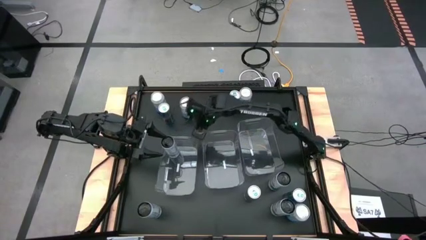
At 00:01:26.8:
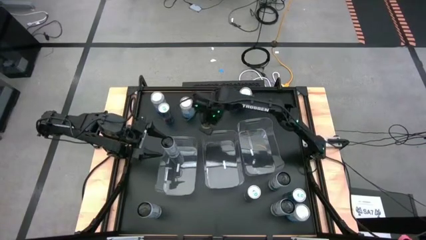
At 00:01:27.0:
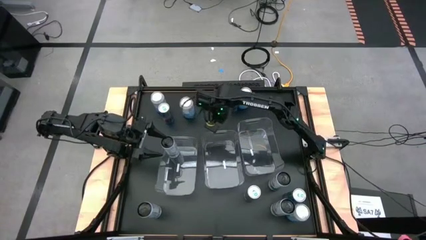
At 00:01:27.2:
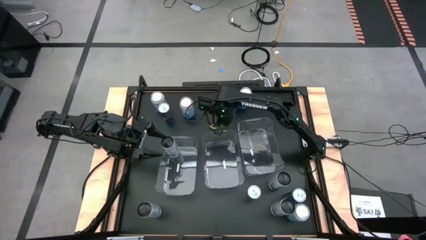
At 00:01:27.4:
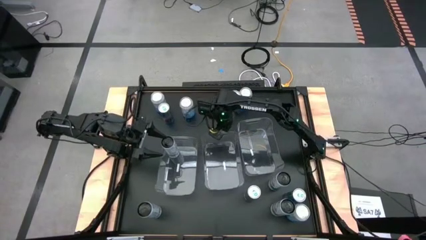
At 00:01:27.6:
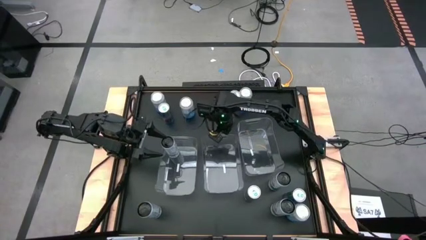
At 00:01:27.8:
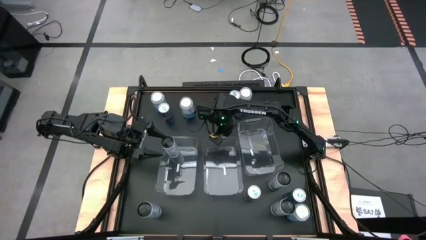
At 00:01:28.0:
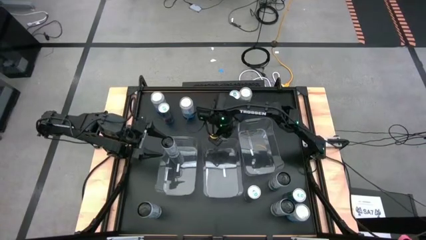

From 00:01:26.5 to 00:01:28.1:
Task: Sort soda cans
Adjust the middle transparent bin

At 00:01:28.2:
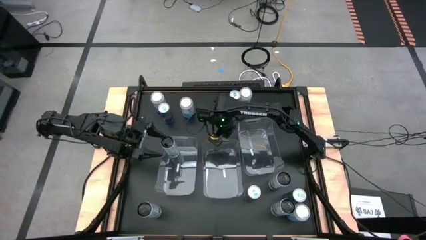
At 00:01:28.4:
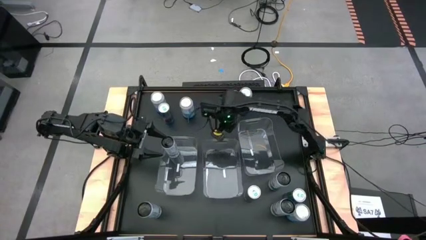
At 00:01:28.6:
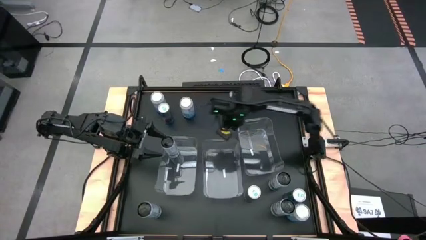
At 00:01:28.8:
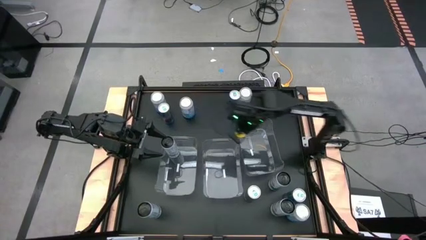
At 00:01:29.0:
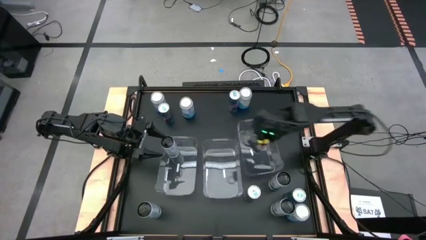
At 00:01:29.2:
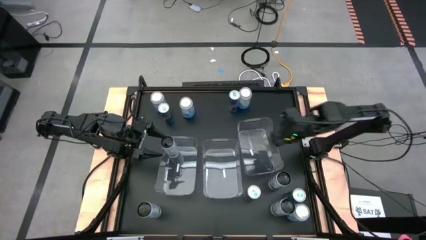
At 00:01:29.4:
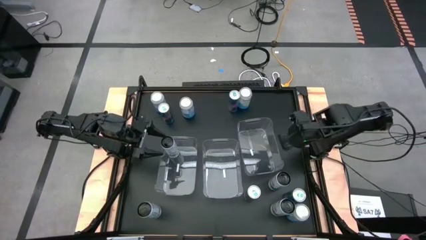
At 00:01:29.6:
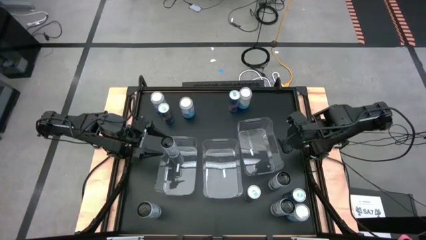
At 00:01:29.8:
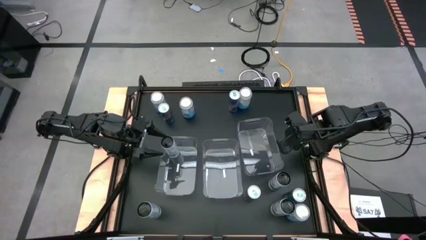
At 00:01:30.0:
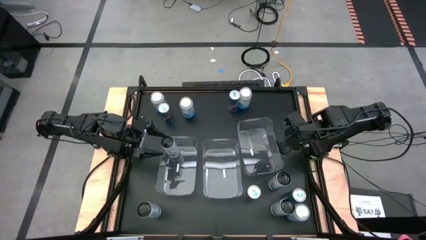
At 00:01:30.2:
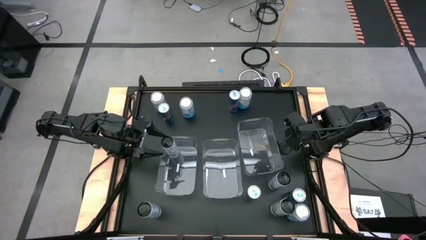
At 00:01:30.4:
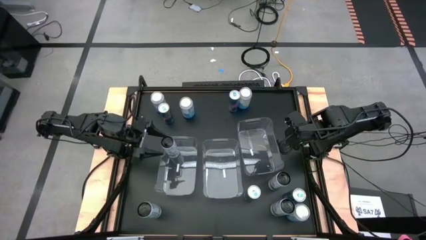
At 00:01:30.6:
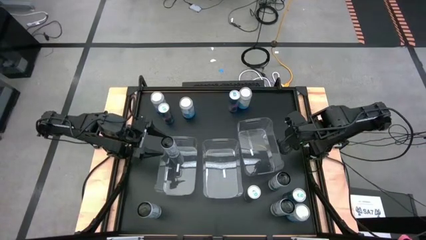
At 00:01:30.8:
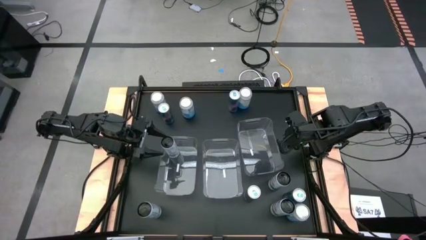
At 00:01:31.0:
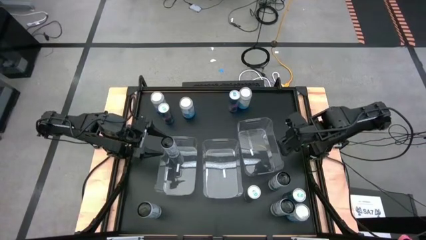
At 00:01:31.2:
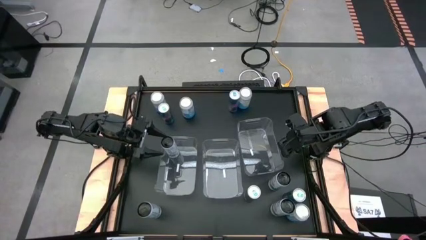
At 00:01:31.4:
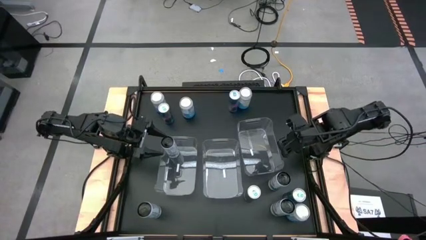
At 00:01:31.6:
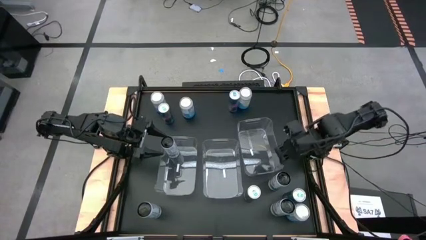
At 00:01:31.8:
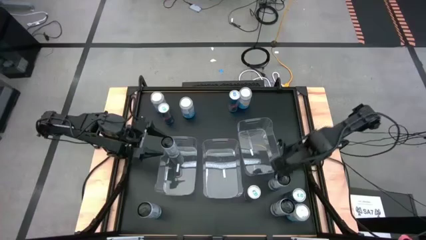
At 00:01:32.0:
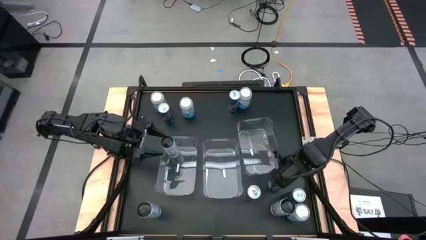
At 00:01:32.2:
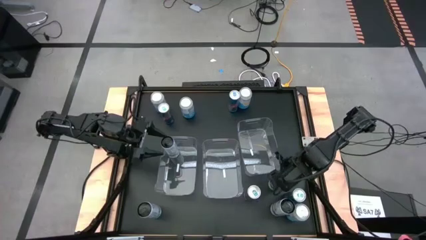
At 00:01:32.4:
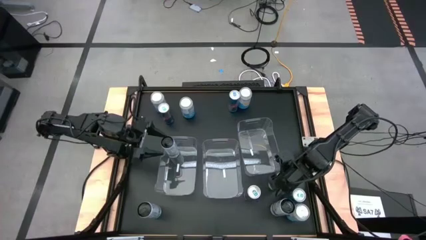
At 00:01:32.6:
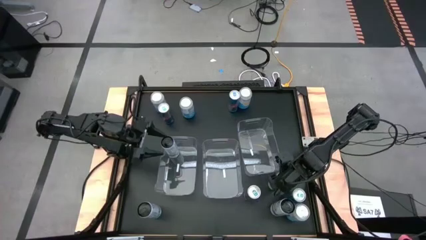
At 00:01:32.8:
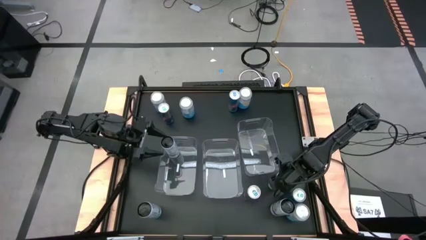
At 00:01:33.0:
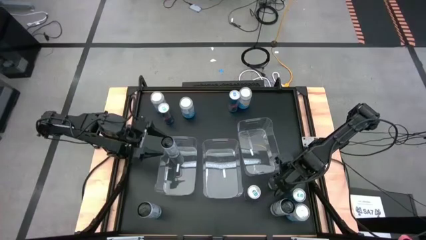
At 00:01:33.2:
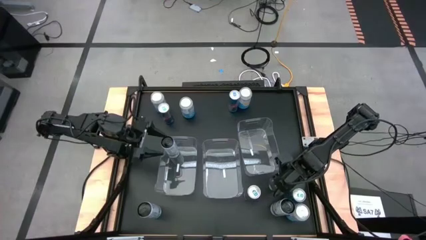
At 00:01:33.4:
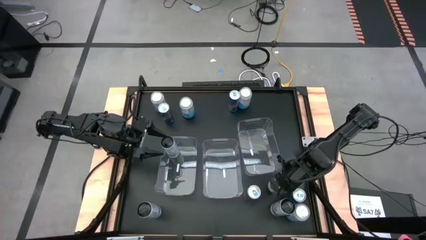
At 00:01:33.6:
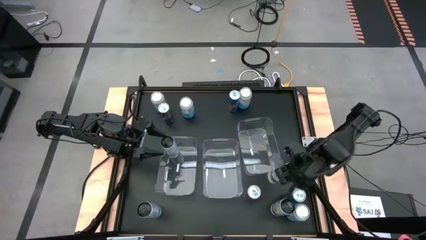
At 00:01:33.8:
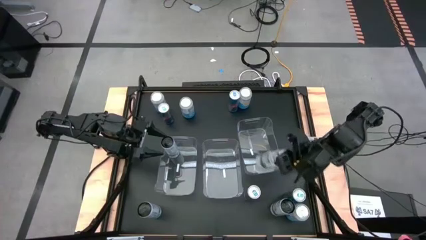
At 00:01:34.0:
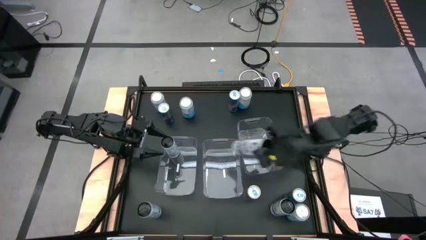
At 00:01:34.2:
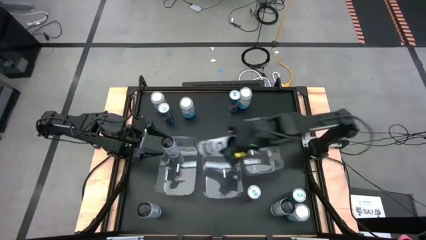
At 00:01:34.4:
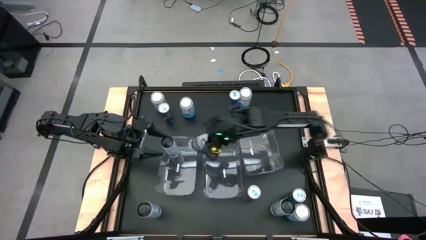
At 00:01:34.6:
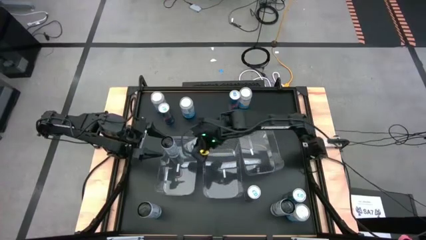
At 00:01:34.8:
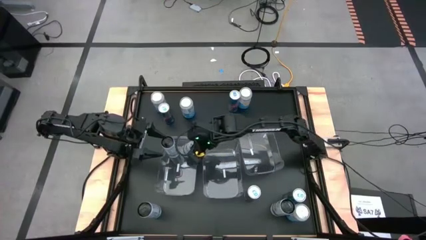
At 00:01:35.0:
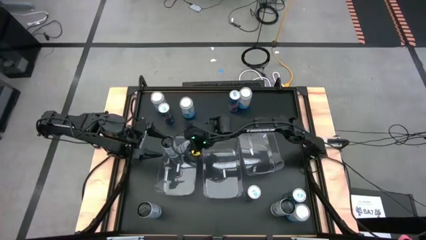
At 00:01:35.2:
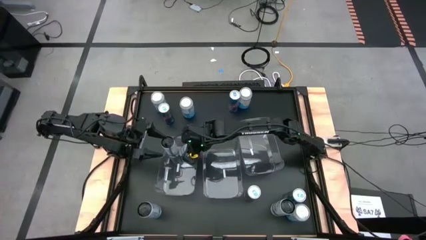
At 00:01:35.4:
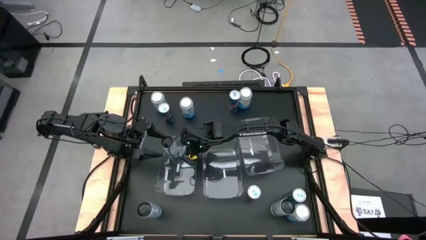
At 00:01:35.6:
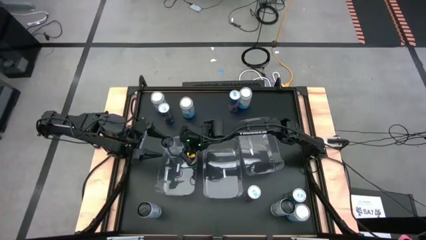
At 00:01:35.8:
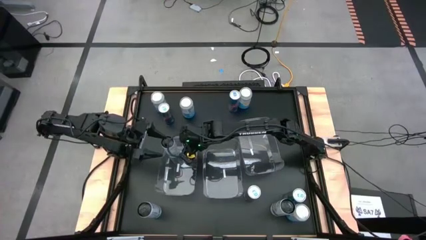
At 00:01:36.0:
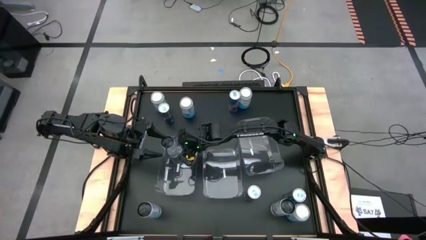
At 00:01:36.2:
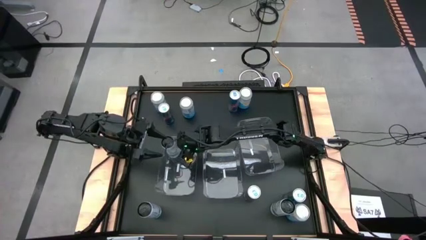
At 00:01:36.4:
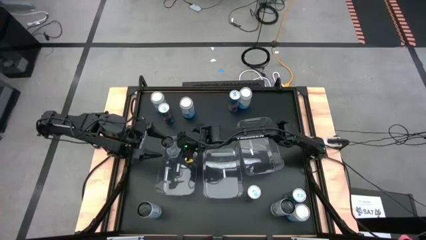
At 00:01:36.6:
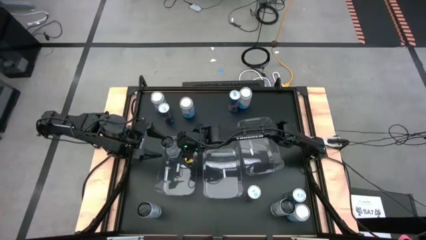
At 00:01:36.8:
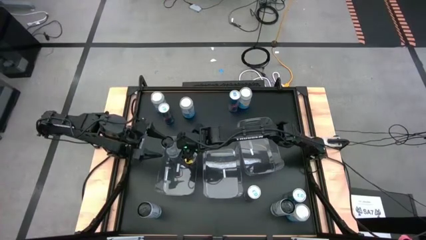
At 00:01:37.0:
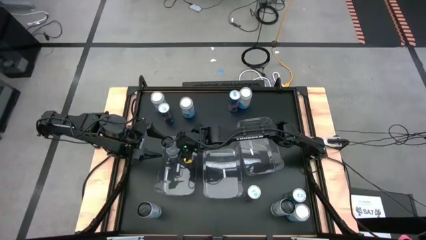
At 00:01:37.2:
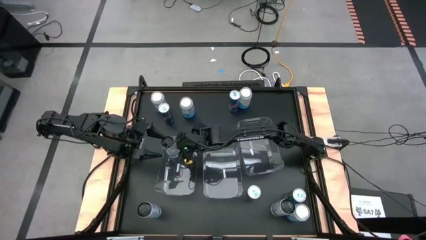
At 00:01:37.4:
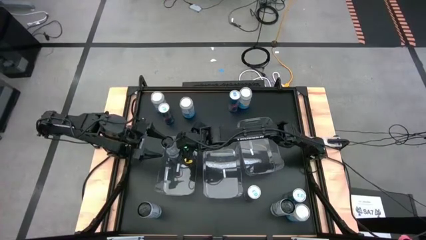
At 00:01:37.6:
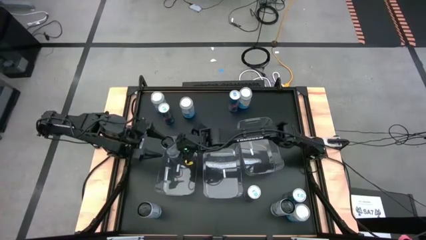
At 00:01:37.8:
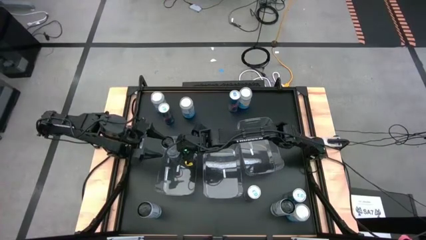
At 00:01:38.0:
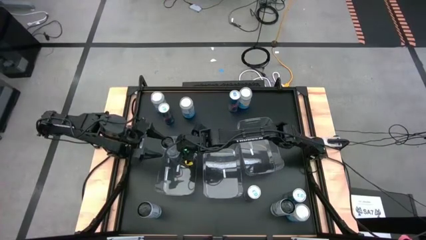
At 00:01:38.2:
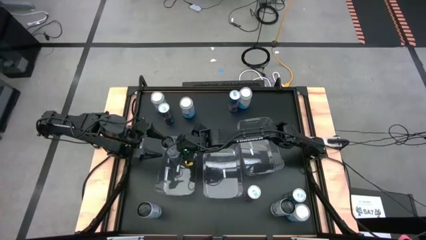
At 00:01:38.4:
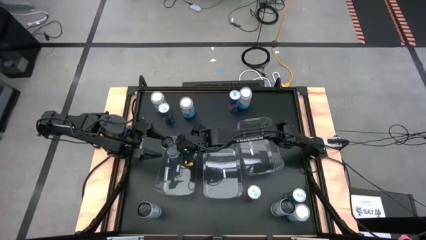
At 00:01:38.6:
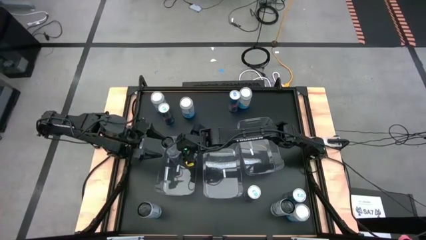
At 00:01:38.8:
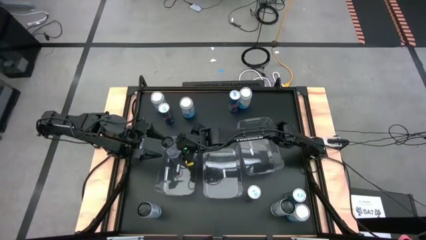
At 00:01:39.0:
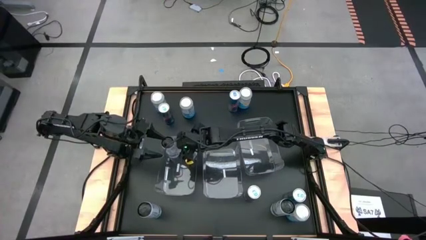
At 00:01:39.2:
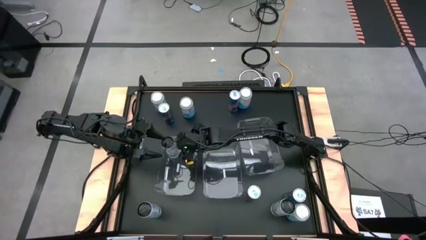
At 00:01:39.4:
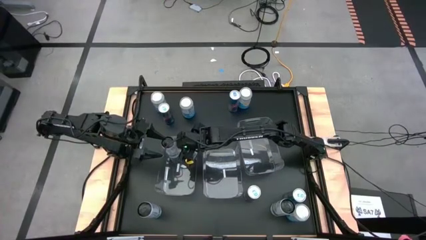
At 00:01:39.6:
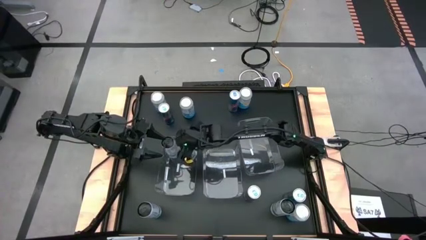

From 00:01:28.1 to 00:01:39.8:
Put the top right white soda can into the left transparent bin

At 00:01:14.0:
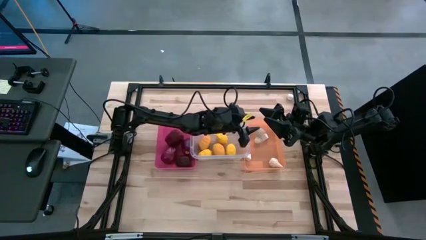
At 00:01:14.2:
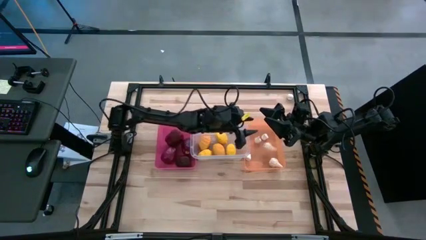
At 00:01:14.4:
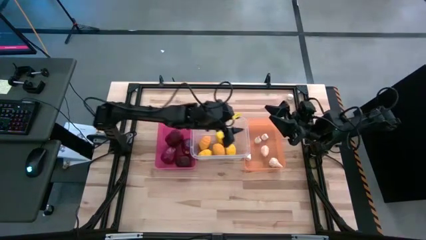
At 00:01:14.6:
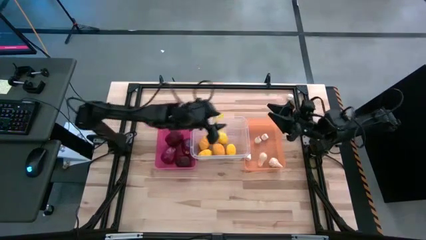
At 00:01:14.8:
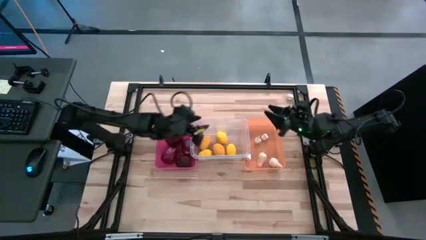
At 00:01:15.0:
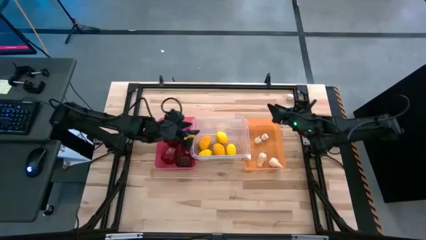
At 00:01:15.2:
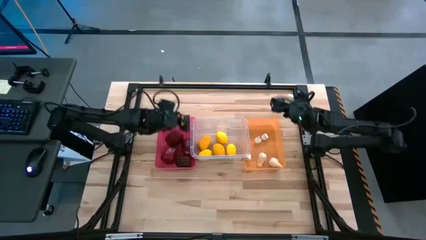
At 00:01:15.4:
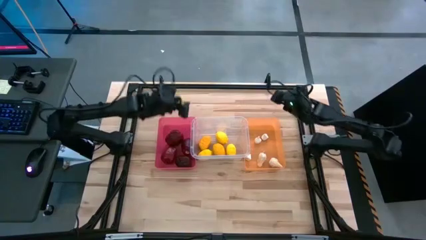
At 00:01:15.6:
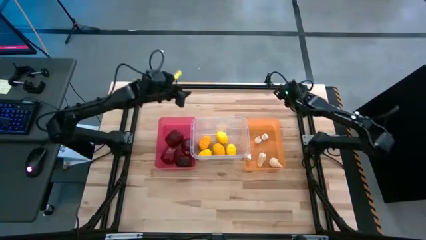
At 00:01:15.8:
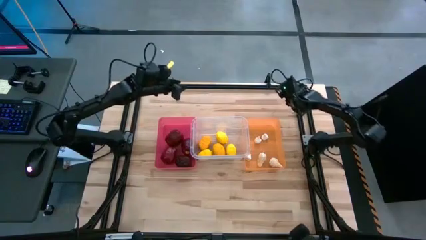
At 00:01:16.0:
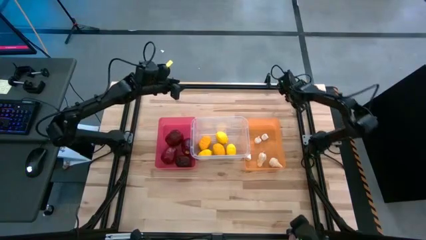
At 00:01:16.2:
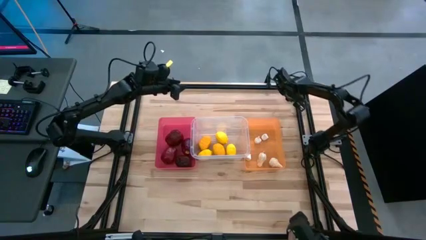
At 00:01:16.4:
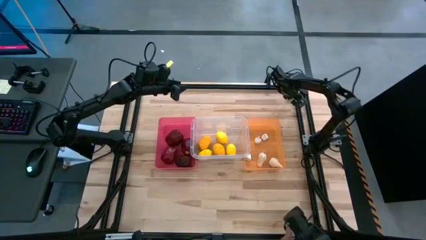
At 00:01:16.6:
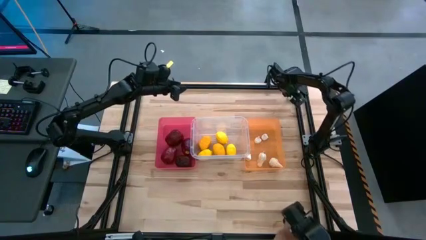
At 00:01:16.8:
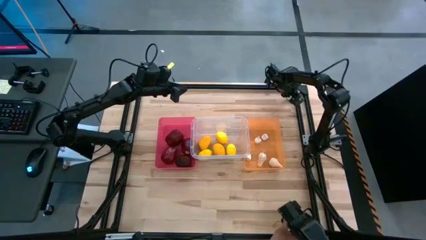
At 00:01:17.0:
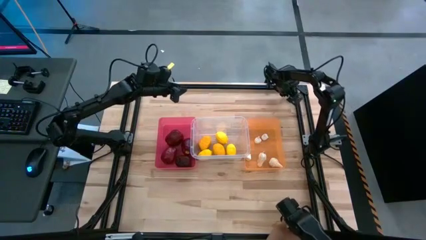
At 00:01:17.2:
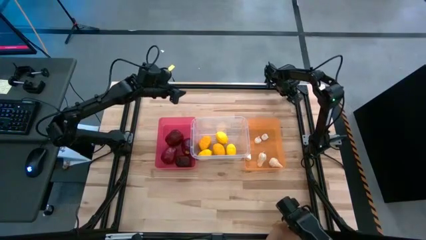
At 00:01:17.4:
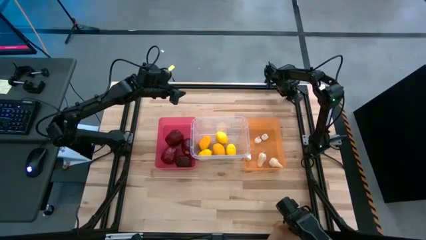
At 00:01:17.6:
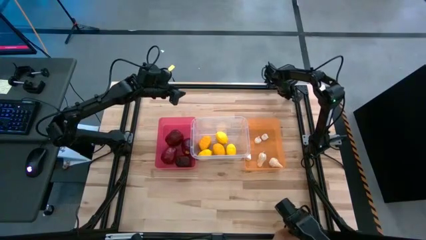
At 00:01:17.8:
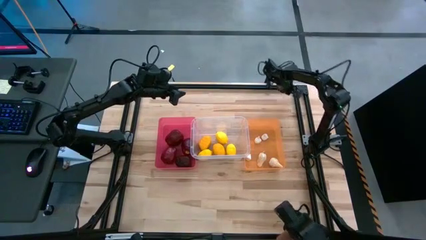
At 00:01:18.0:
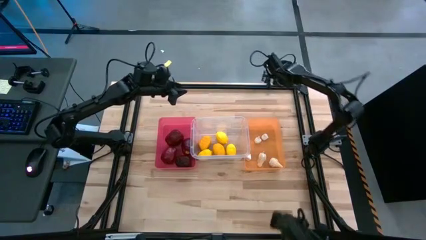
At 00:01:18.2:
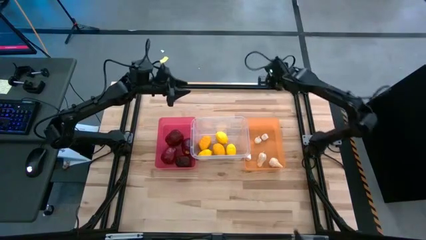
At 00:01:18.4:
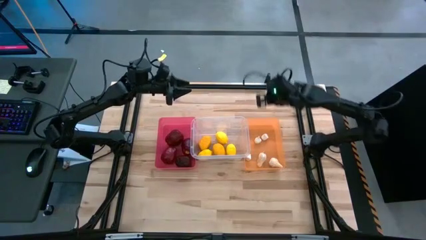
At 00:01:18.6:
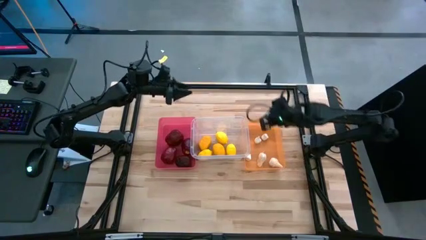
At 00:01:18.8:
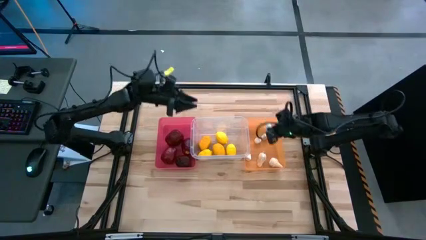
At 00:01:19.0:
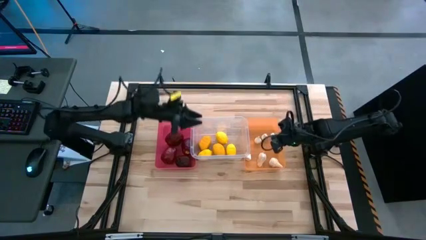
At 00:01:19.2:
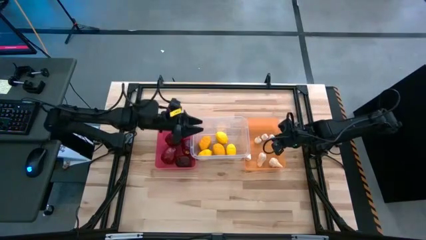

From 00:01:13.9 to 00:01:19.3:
Task: Sort produce into baskets
Put the white garlic into the orange bin
